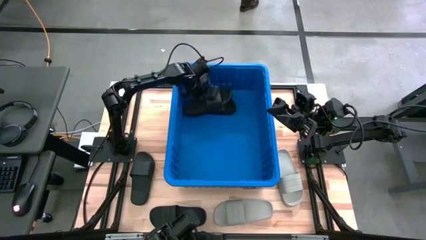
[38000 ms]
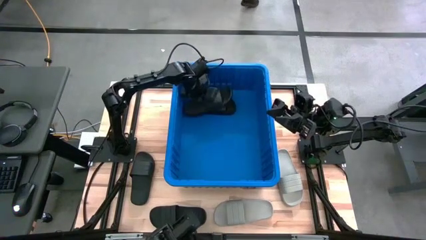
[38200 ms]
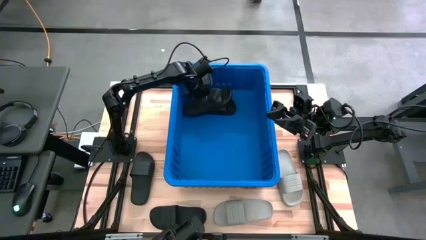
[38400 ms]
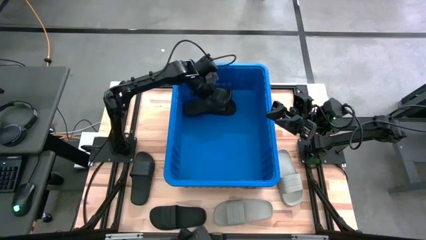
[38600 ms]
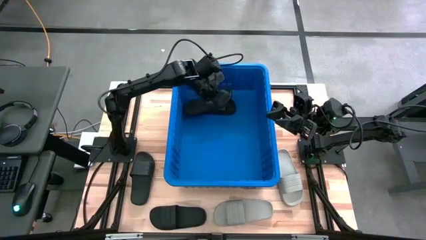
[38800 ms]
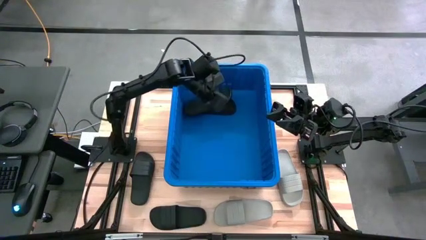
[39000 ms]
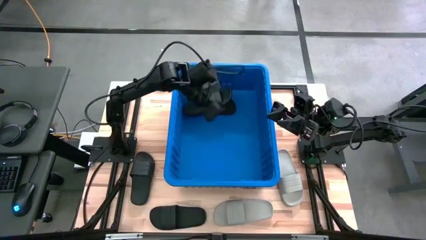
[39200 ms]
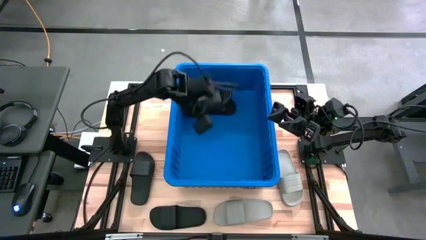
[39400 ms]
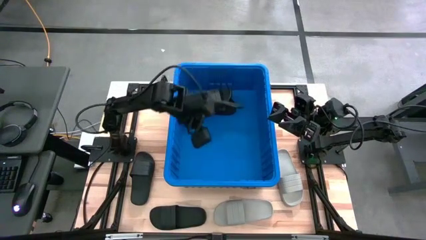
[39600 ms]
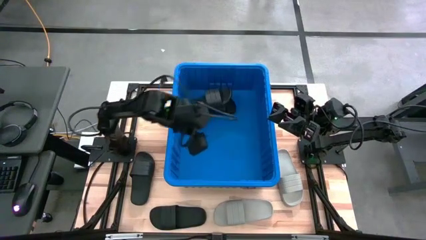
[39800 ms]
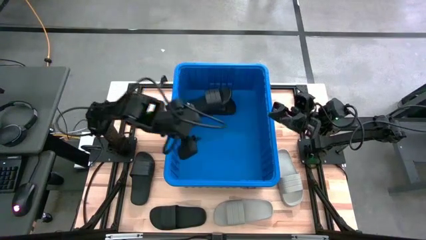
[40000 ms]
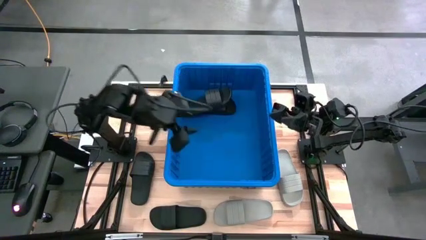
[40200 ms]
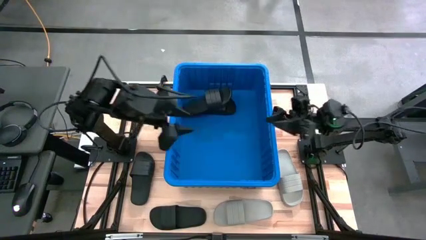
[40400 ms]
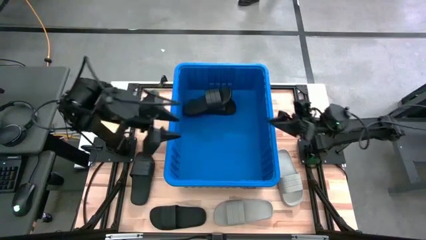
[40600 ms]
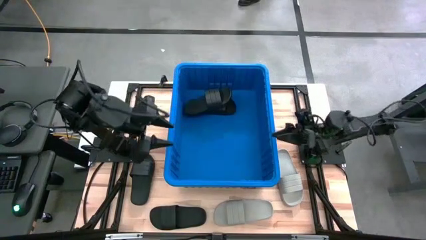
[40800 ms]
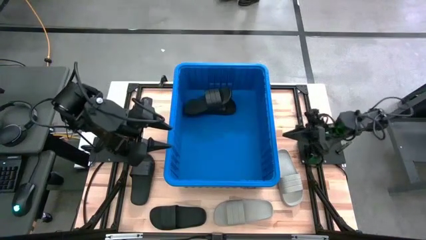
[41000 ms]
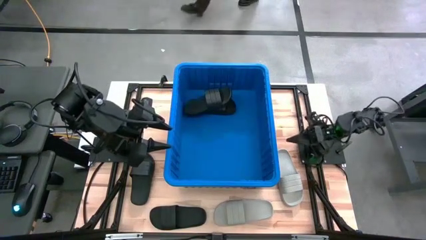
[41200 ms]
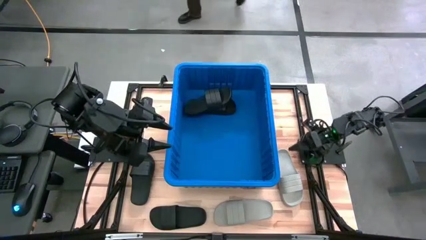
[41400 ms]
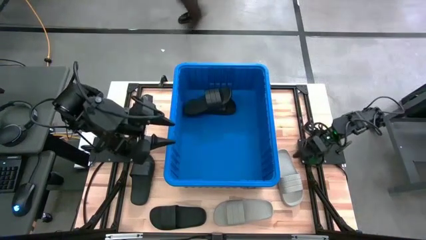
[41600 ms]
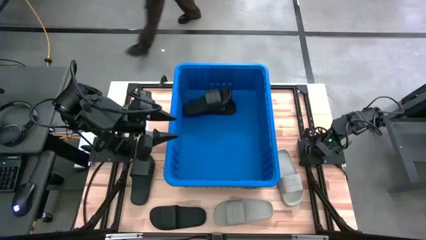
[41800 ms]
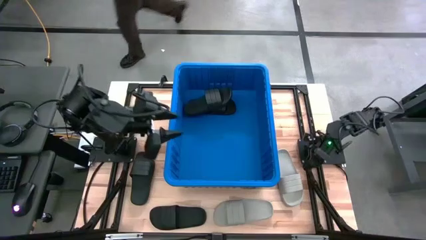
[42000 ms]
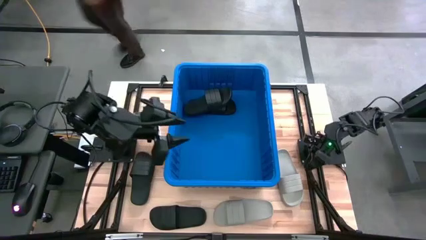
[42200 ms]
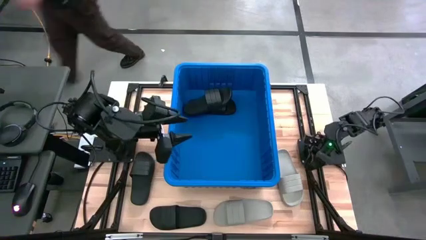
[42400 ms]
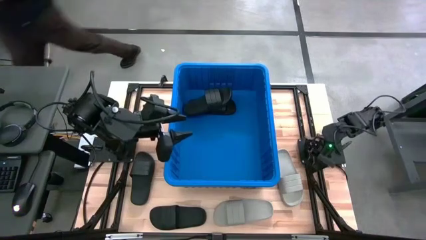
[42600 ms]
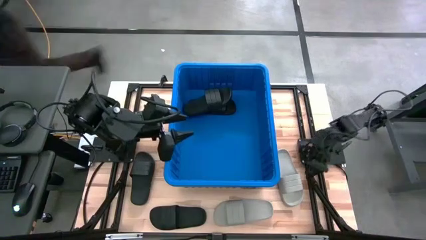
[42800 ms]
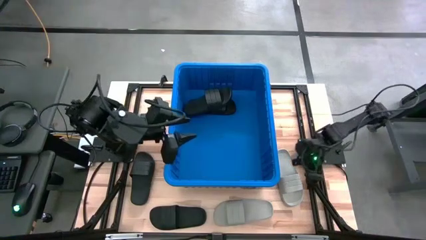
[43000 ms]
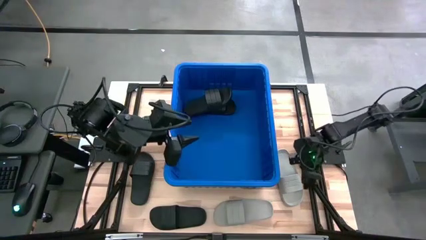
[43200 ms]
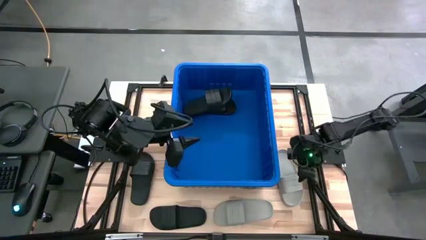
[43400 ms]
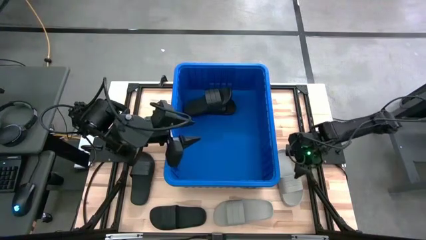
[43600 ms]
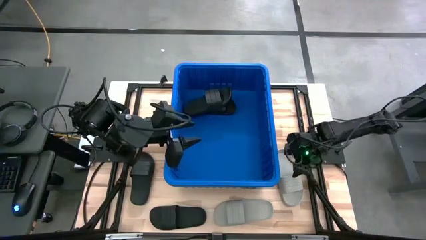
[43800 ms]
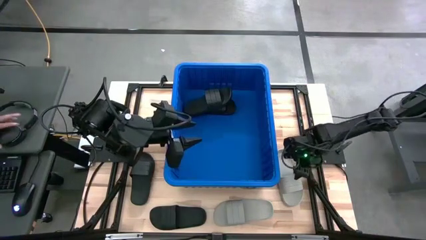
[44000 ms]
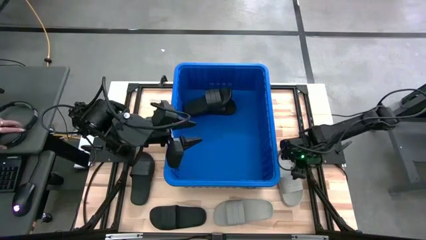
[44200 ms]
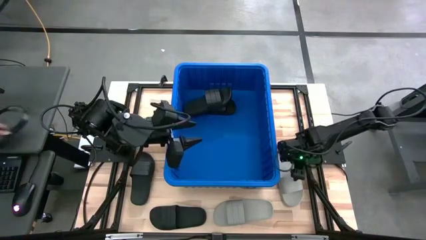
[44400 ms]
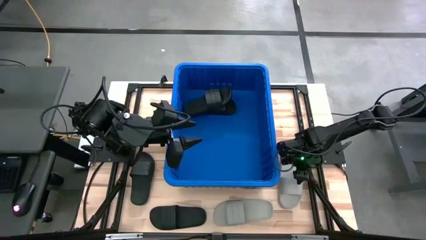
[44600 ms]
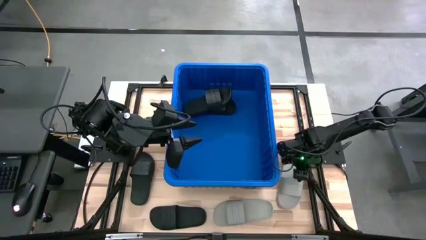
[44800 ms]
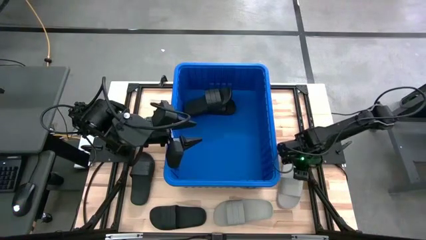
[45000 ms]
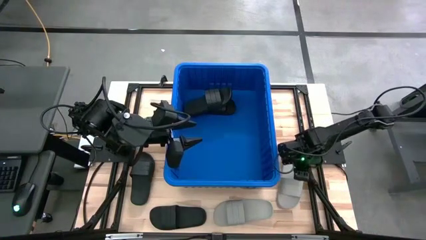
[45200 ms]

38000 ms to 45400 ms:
Task: Pick and place slides into bin
Put the right white slipper into the bin

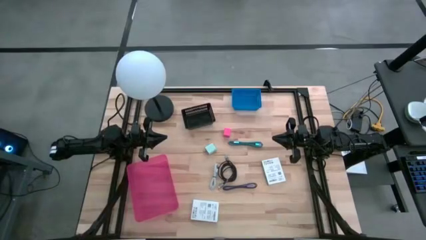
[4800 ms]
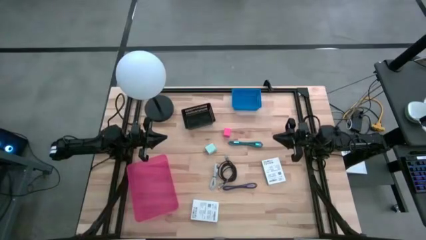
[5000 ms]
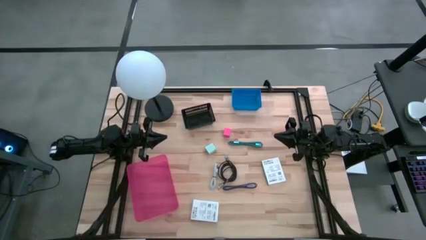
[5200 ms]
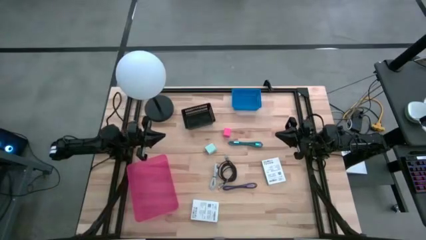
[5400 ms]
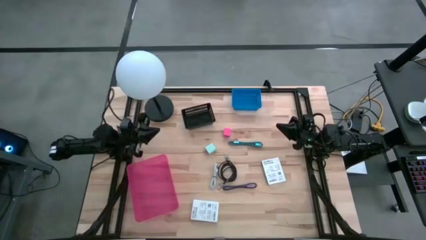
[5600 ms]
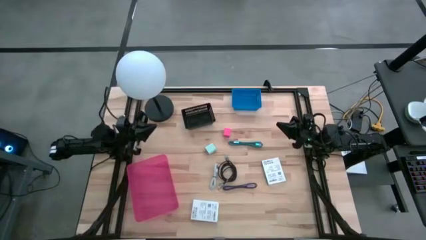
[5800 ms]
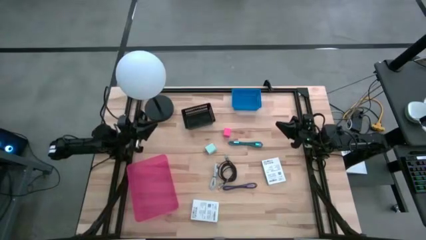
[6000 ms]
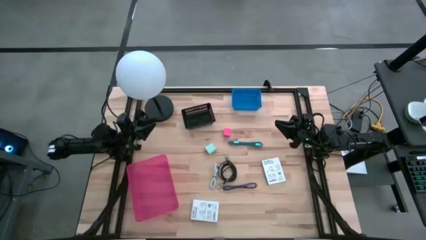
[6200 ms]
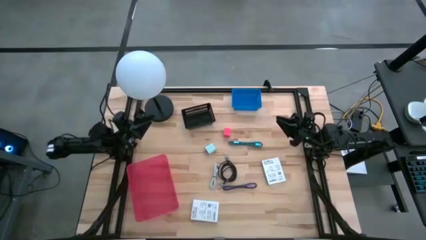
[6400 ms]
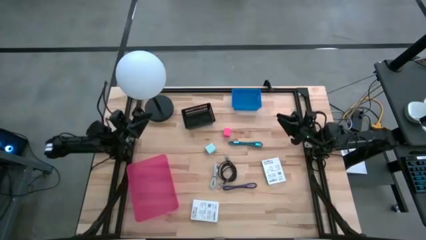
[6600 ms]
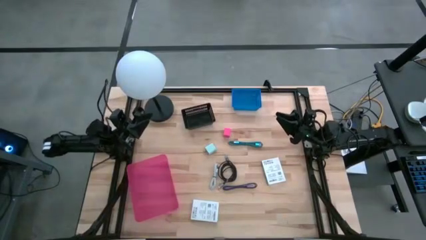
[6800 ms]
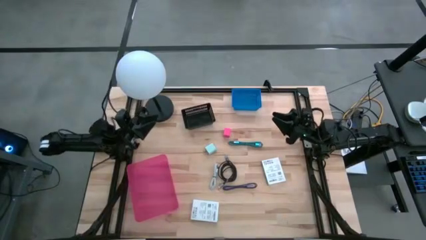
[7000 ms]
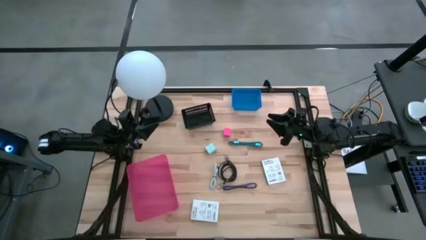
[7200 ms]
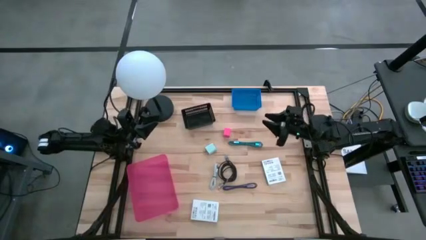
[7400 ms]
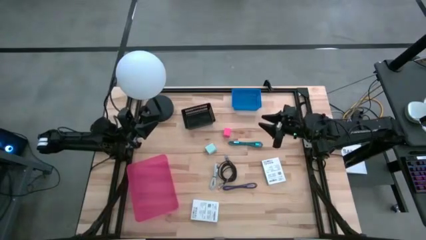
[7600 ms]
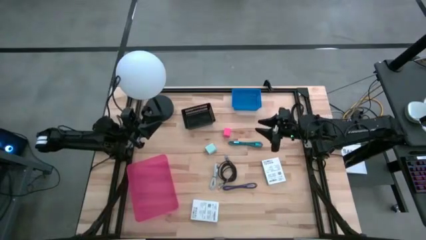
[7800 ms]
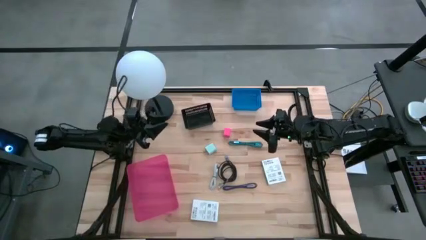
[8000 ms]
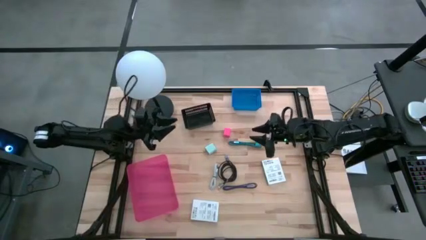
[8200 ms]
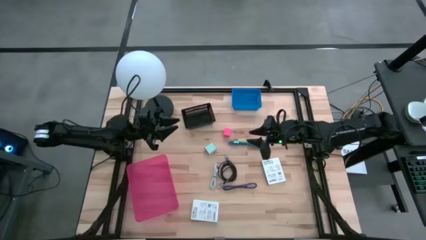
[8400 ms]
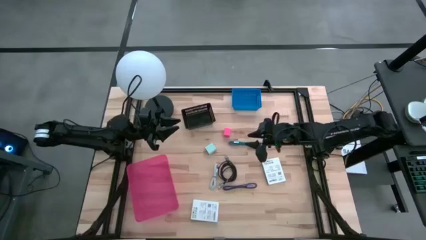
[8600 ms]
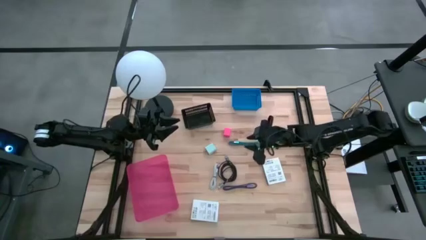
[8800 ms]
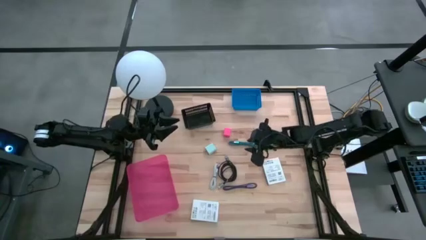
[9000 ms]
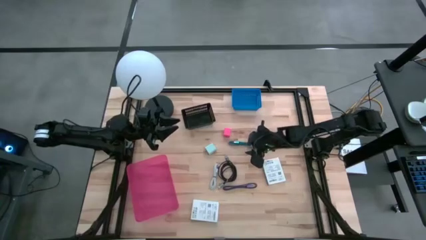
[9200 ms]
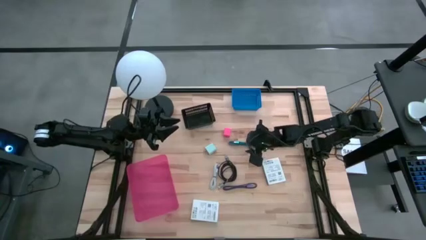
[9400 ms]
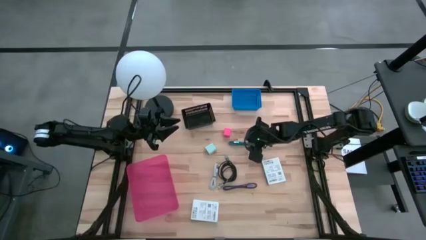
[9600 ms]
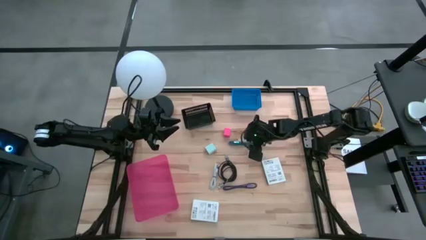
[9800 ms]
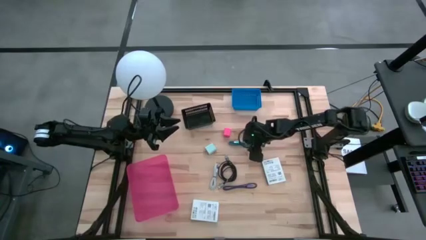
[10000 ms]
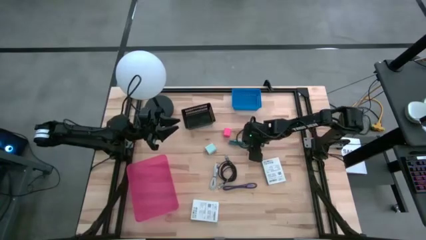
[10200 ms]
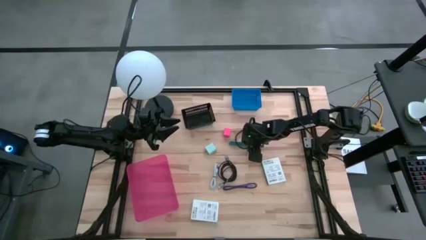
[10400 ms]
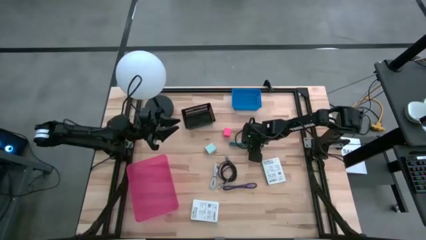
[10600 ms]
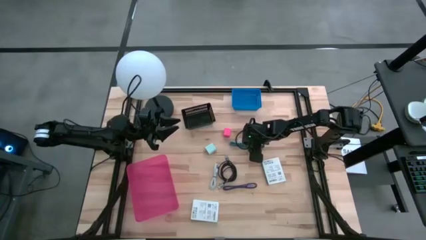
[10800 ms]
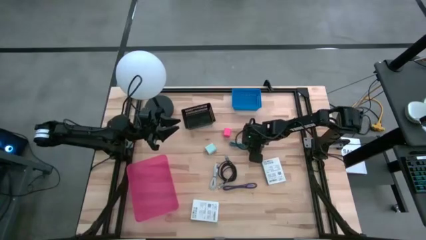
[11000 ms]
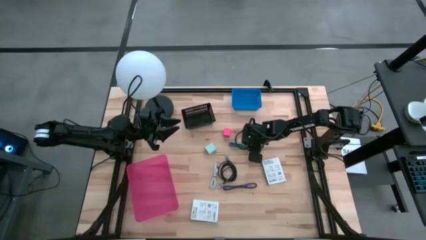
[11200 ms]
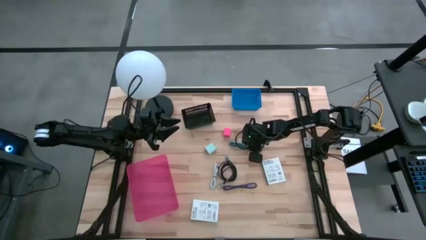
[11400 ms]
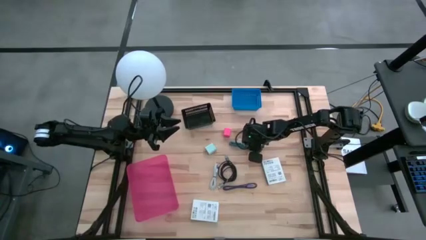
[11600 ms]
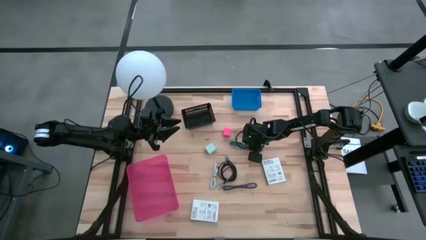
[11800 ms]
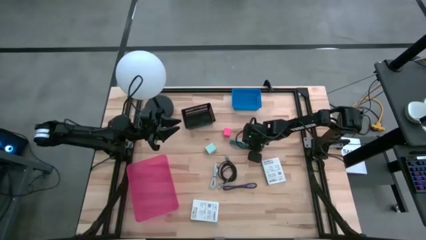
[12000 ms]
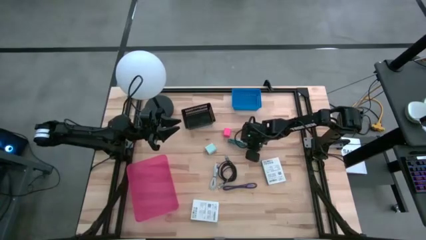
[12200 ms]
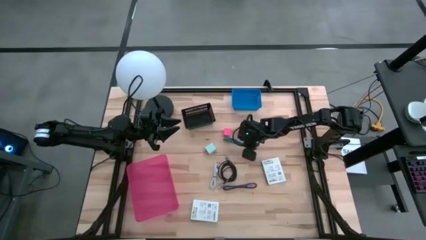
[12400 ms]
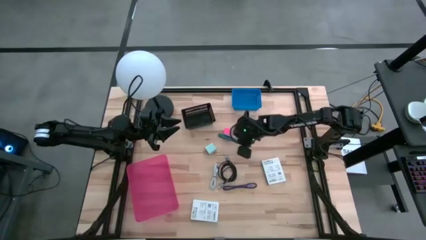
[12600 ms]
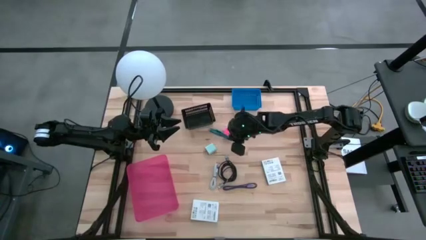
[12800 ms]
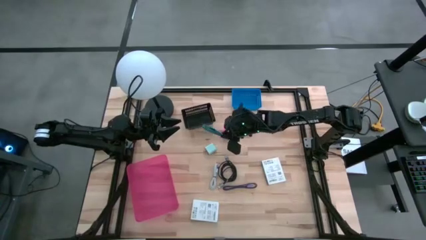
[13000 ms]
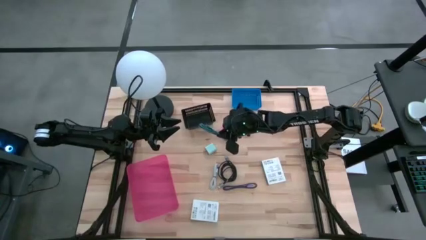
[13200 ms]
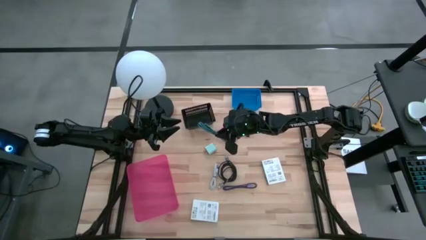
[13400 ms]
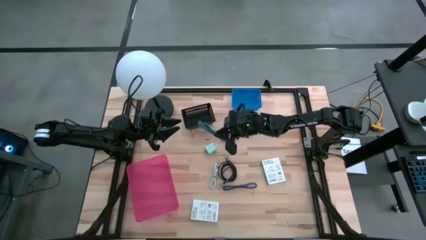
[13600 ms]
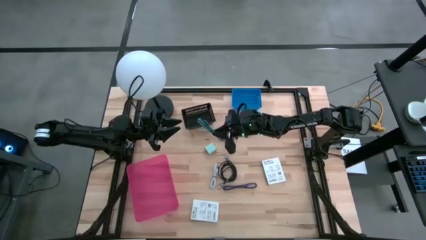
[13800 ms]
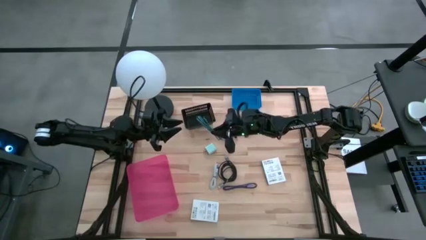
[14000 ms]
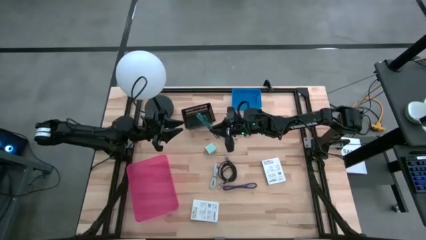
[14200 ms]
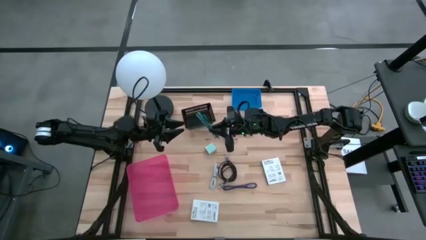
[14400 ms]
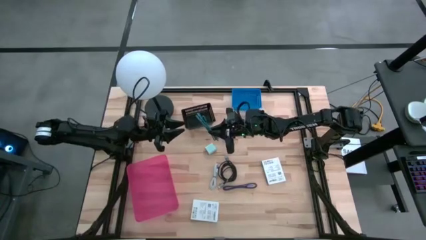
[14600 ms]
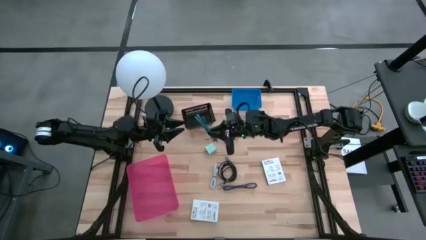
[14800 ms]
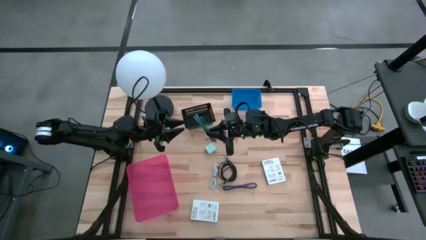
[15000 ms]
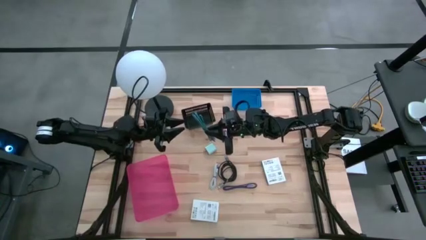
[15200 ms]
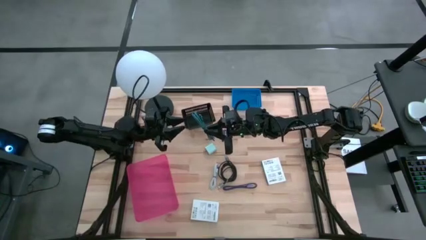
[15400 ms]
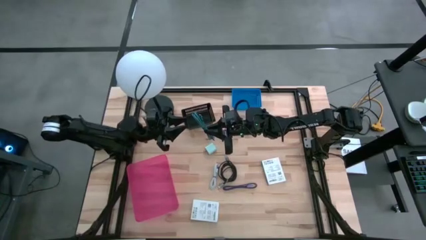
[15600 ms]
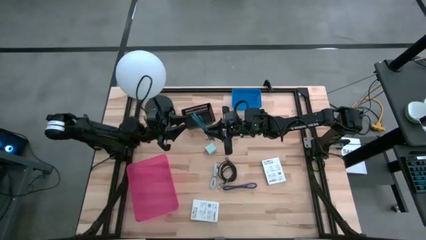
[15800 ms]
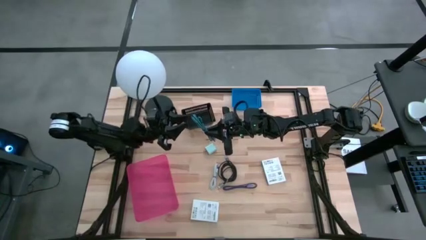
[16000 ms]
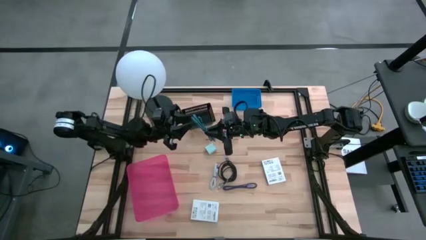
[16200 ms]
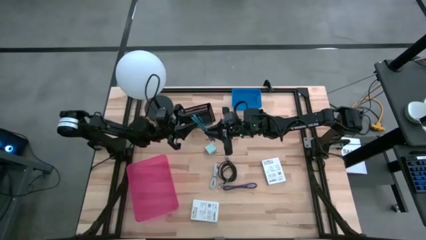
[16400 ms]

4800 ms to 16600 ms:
Task: Pick and place items into bin
Put the blue patterned charger cable into the light pink bin
